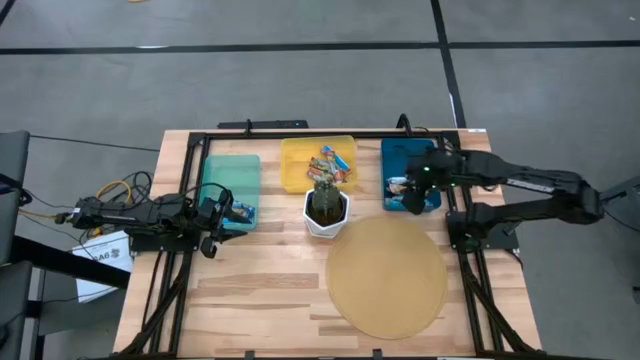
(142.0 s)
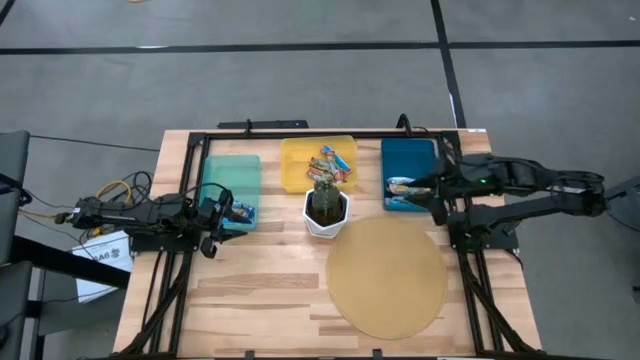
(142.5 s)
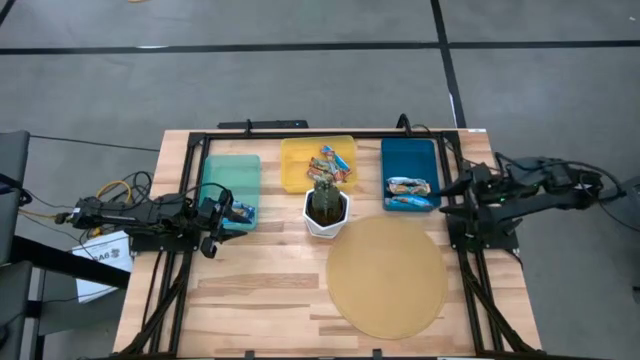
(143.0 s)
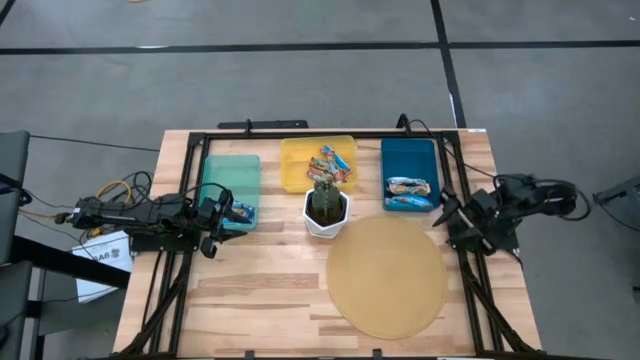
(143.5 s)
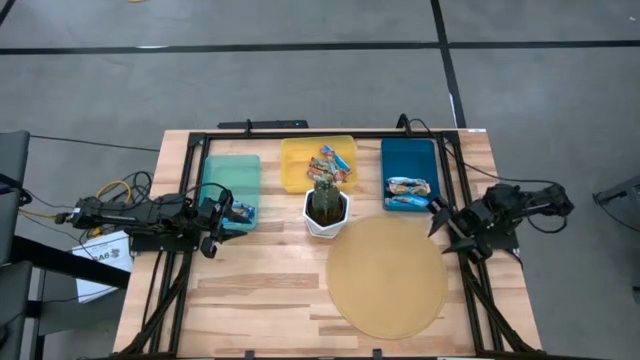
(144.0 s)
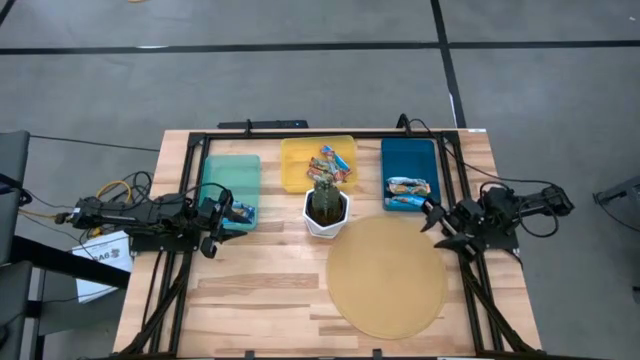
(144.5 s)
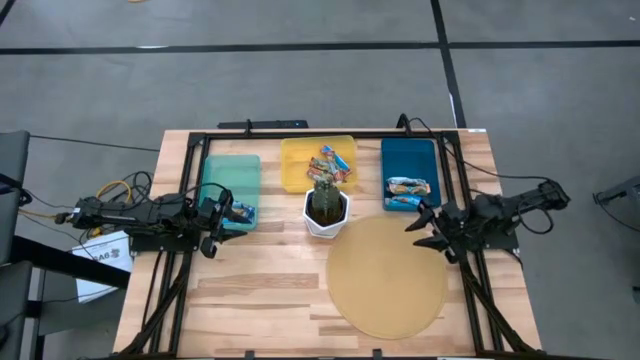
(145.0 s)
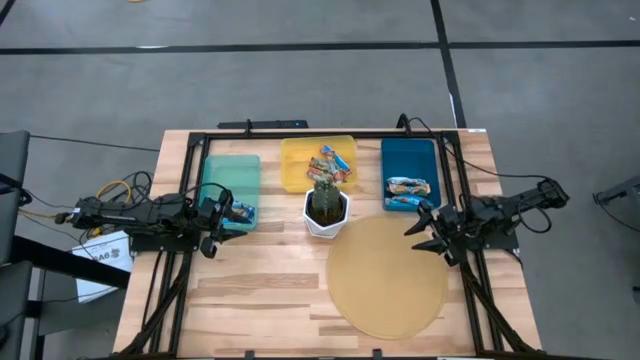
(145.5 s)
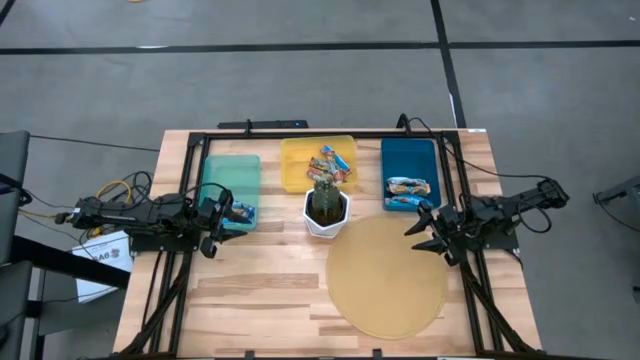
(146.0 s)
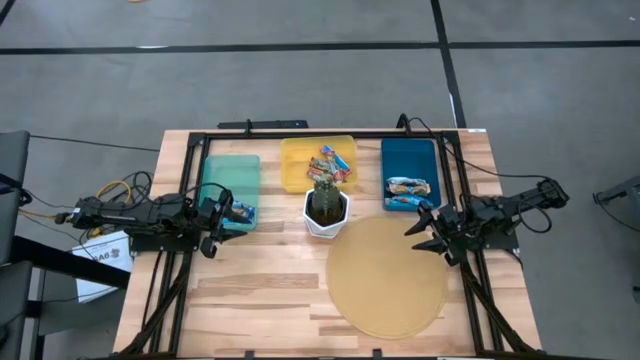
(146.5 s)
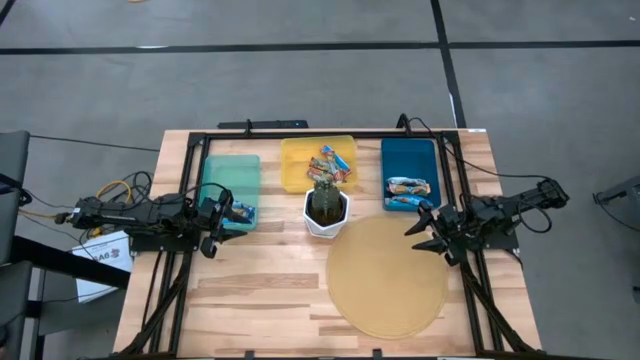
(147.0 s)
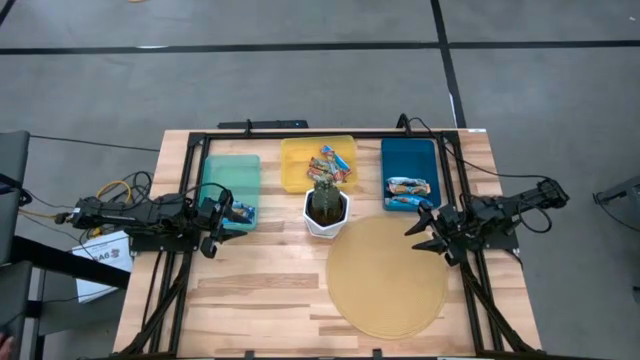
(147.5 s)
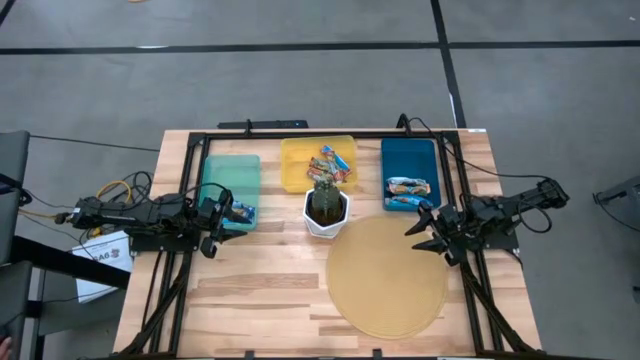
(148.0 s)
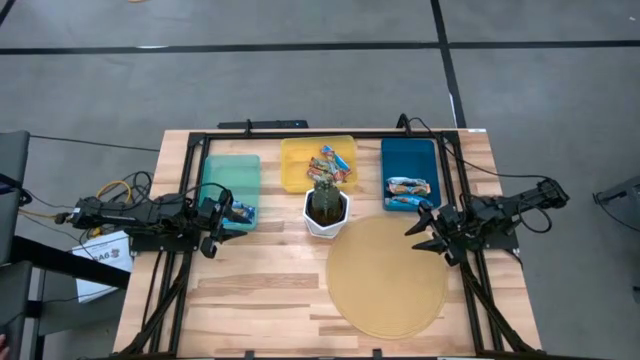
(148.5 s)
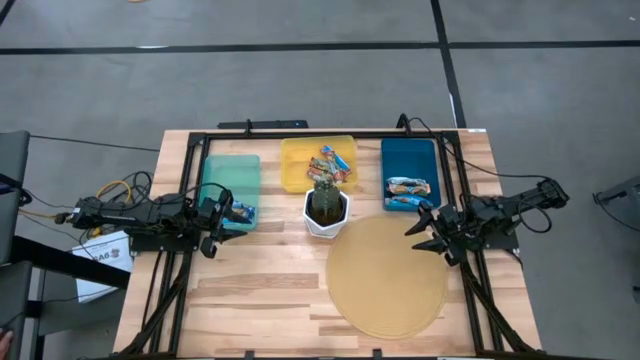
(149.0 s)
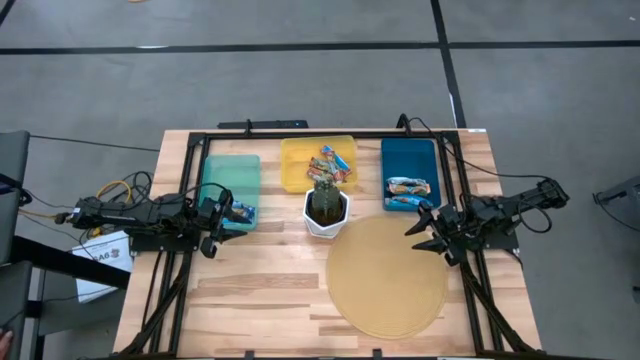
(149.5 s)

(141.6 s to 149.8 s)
Task: Pick and place Granola Bars by type
Return to Home Position

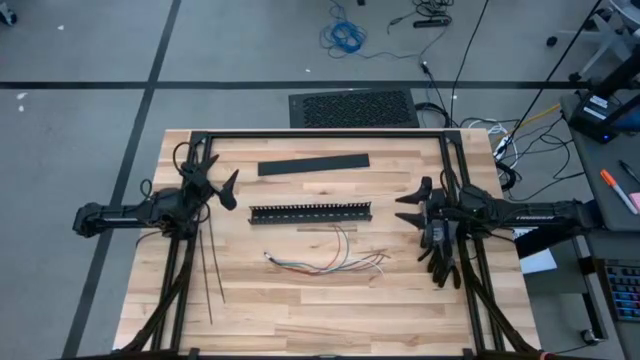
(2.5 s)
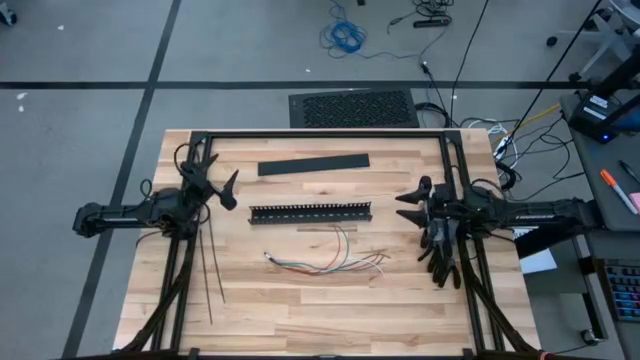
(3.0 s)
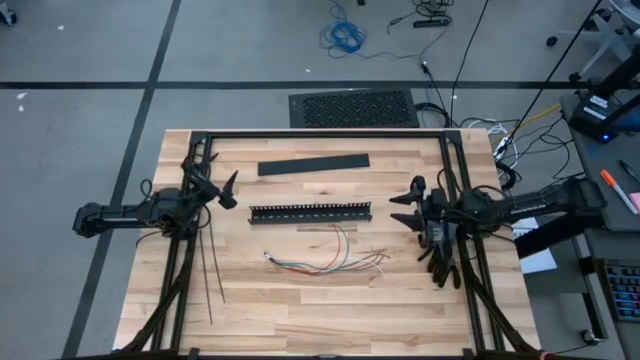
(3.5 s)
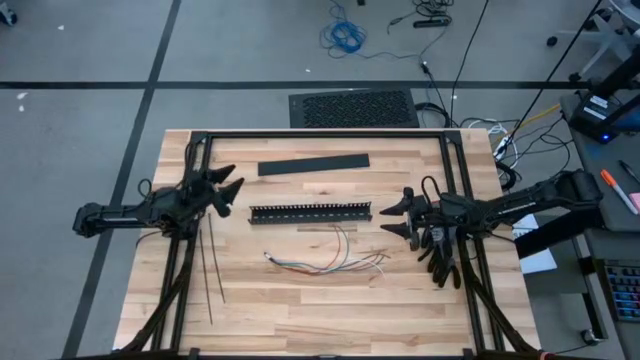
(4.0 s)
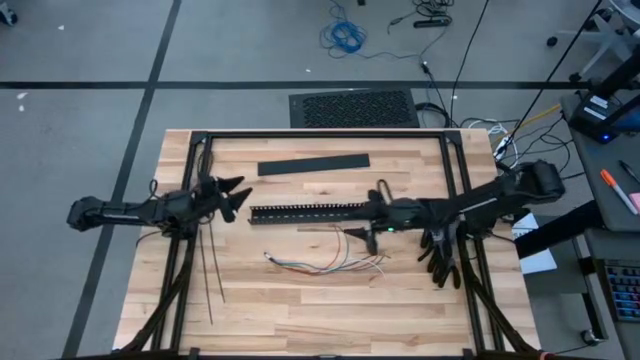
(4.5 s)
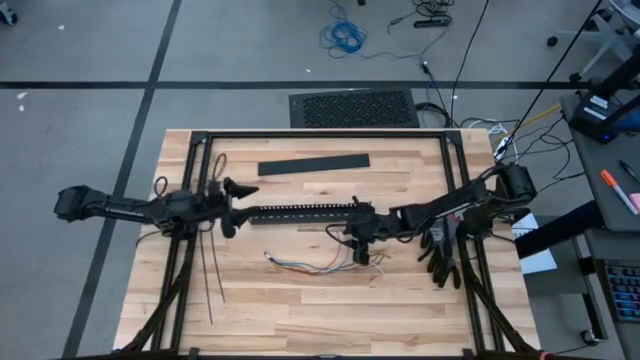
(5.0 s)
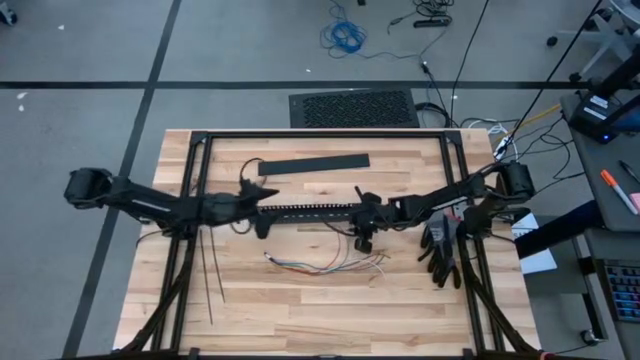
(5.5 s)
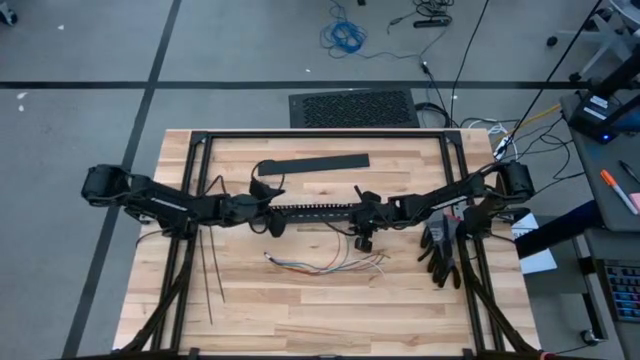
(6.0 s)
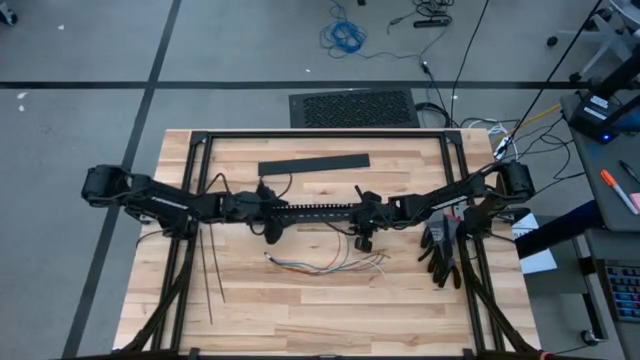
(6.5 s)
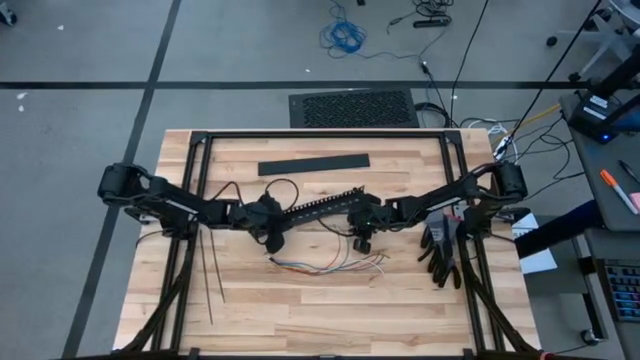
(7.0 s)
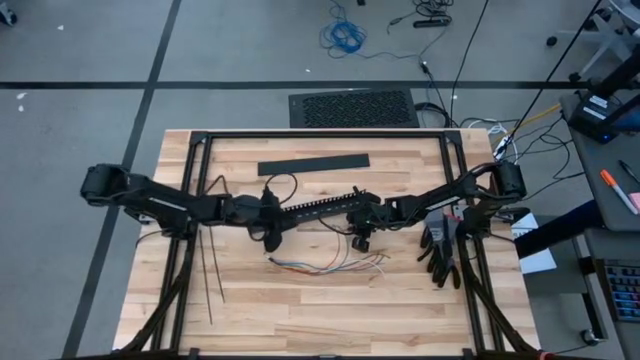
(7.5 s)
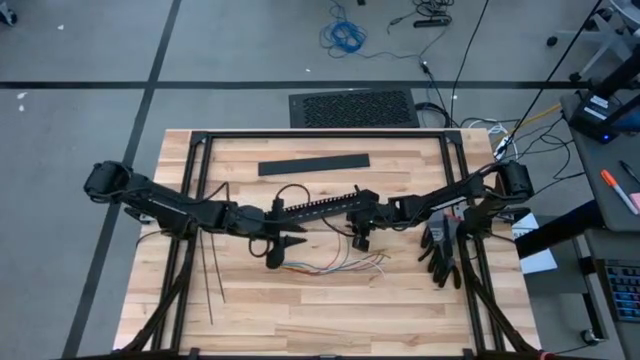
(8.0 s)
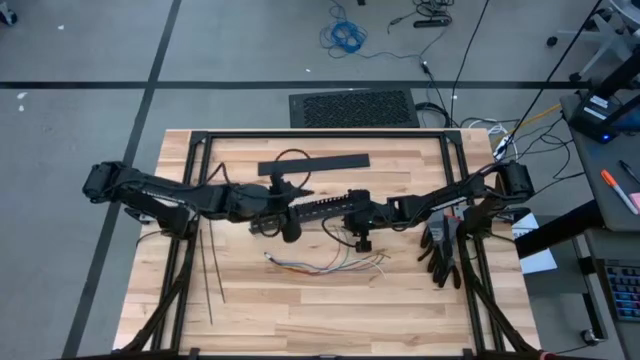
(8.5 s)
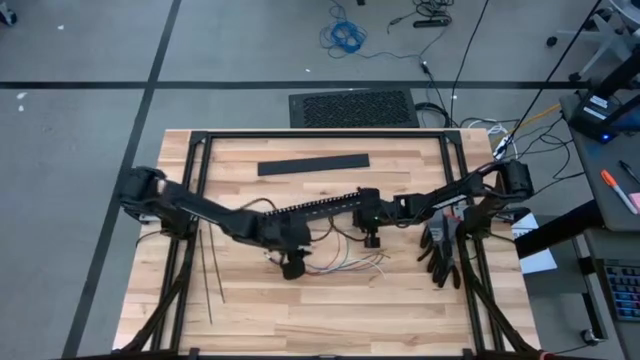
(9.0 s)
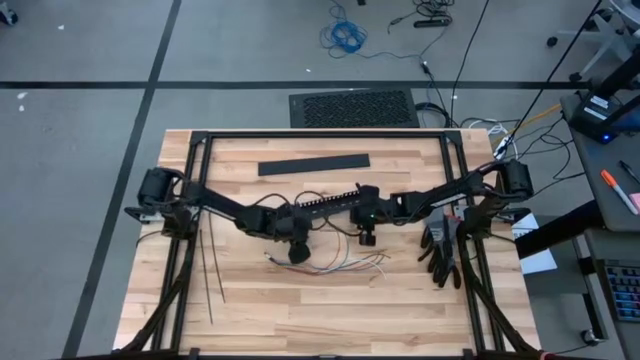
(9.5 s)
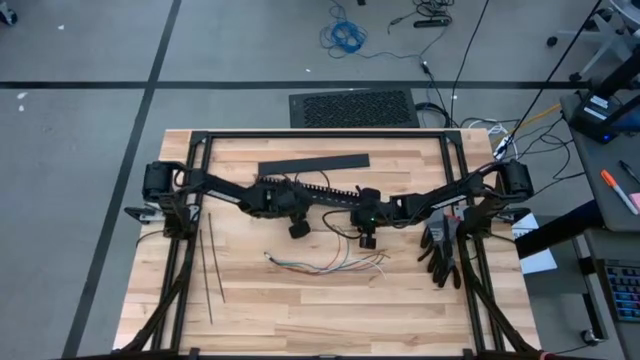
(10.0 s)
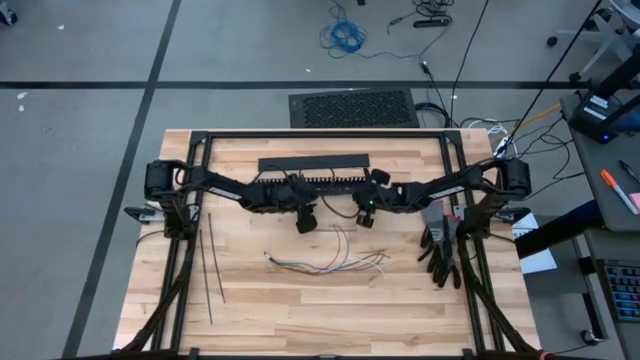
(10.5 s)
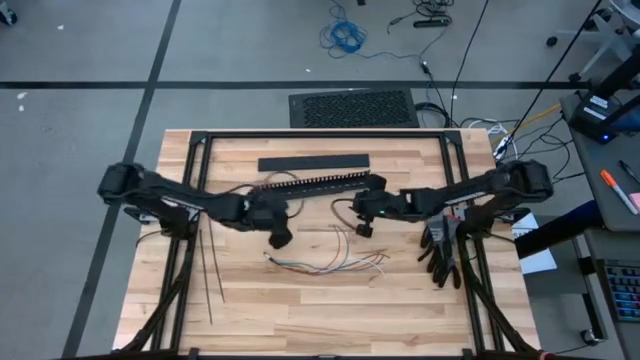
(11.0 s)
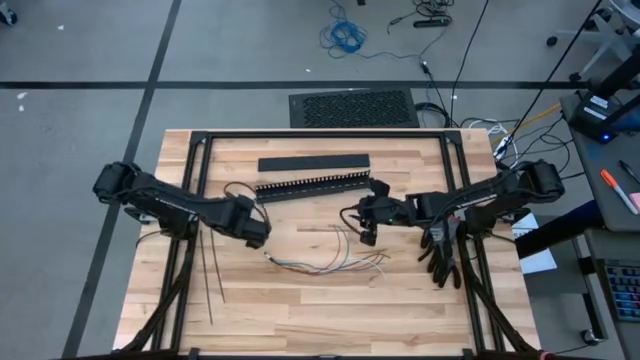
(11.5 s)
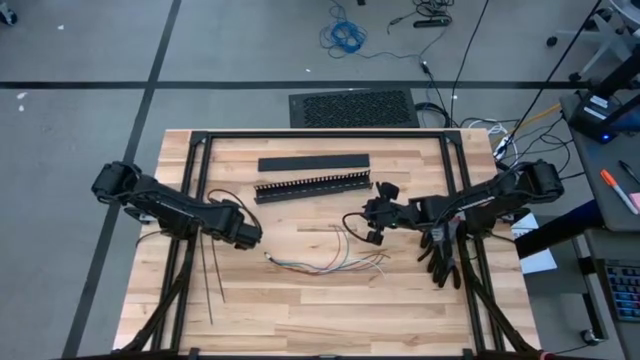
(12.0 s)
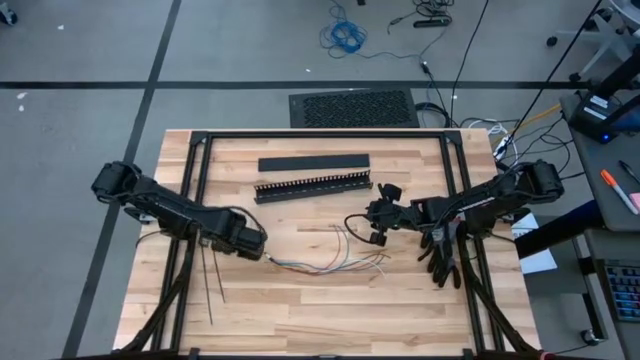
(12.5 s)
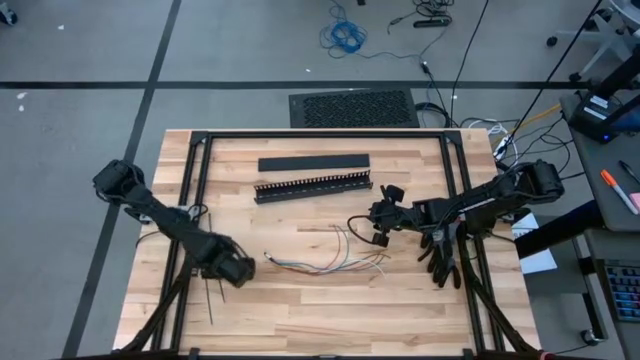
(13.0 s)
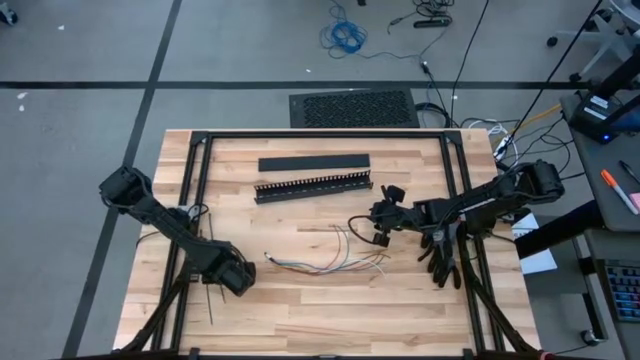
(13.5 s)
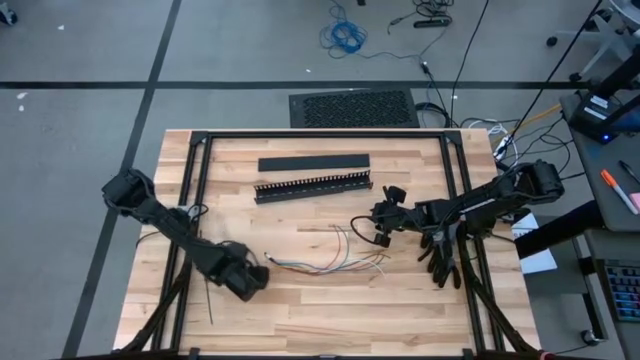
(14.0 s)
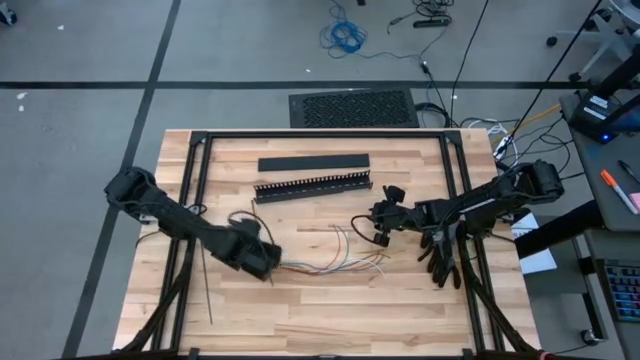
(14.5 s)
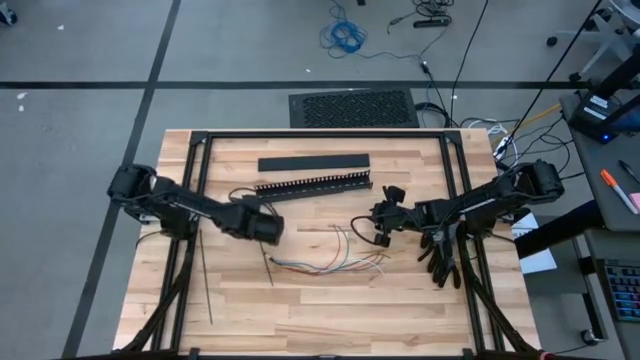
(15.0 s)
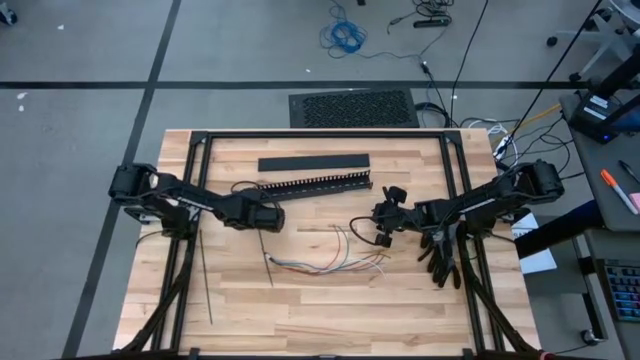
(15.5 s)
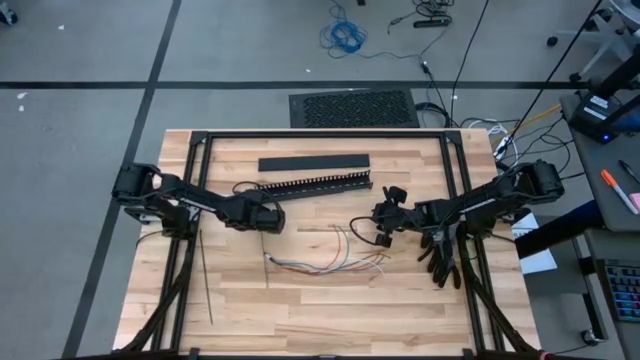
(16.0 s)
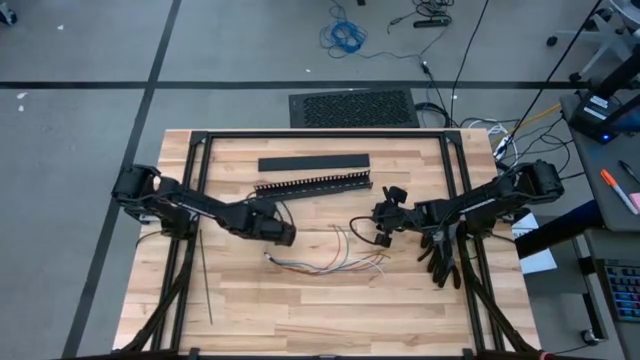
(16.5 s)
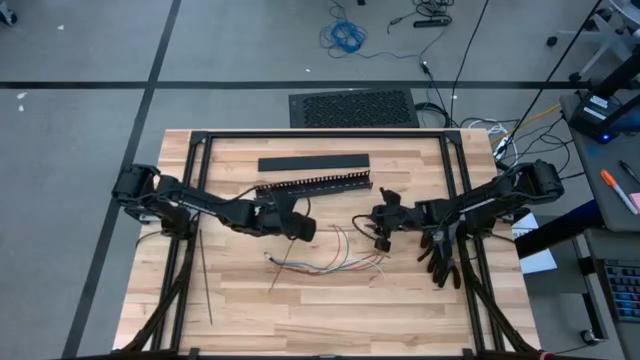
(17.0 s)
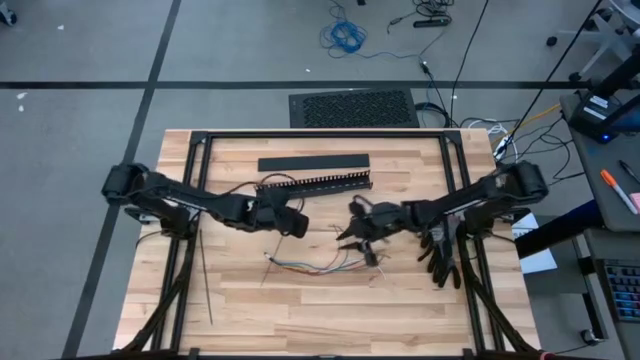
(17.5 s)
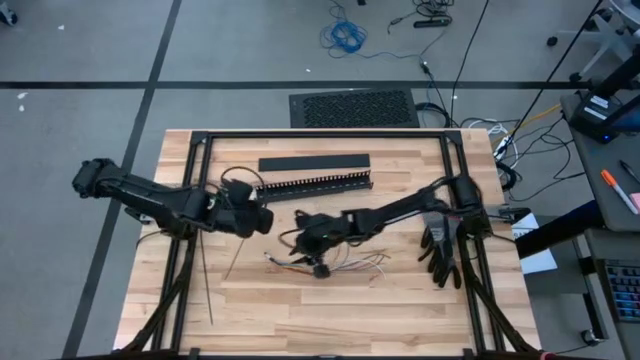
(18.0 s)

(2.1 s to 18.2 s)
Task: Ziptie cables
Wrap the cable wires with the black zip tie
